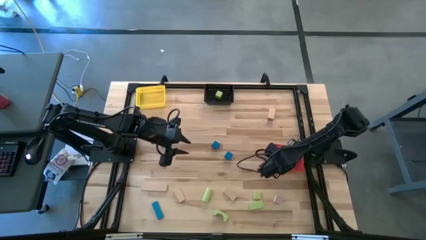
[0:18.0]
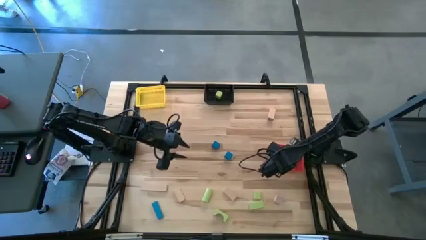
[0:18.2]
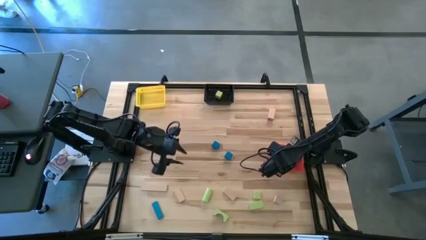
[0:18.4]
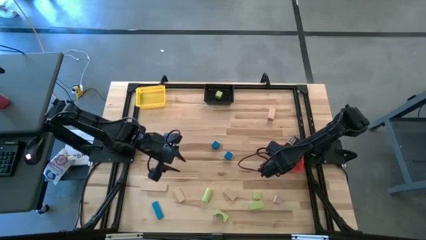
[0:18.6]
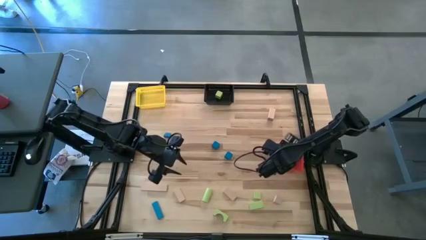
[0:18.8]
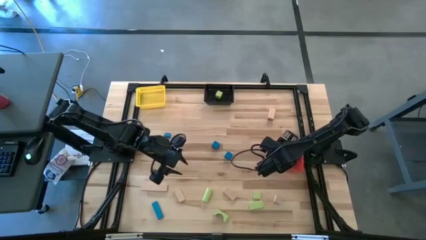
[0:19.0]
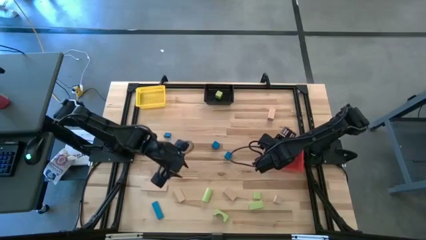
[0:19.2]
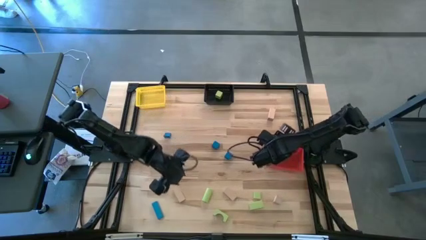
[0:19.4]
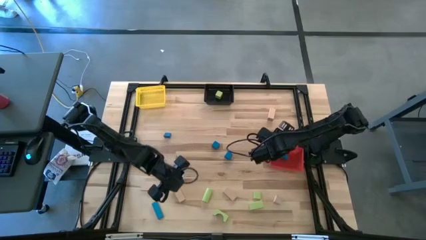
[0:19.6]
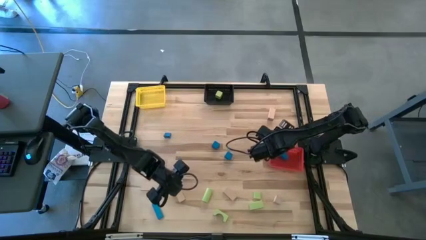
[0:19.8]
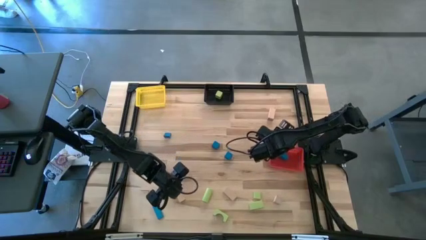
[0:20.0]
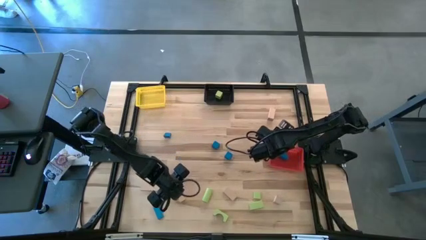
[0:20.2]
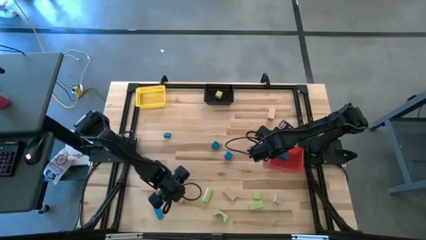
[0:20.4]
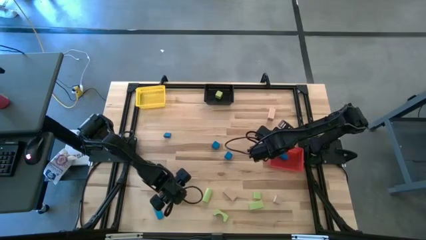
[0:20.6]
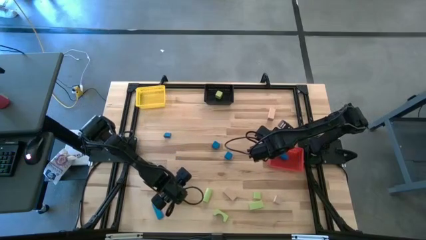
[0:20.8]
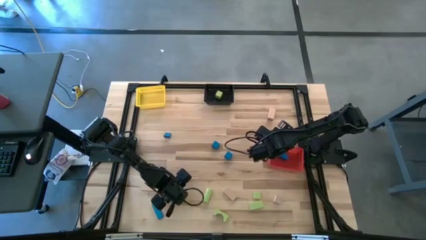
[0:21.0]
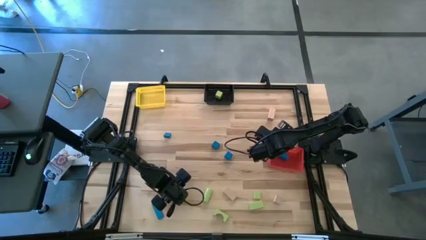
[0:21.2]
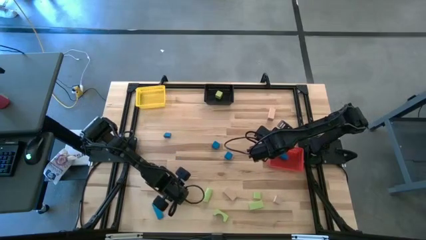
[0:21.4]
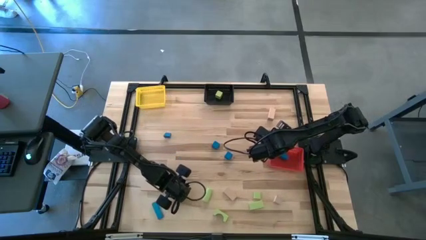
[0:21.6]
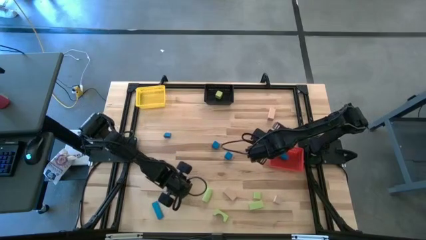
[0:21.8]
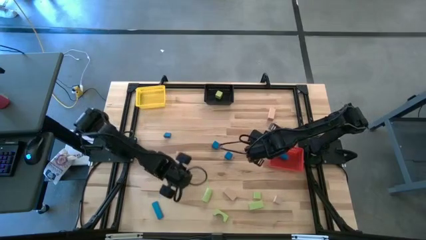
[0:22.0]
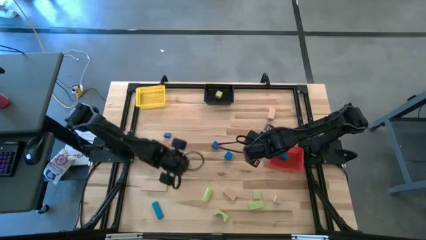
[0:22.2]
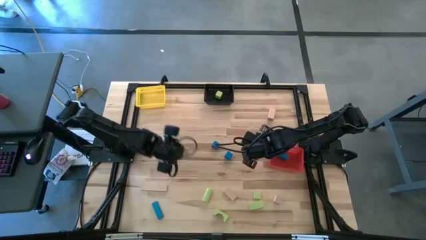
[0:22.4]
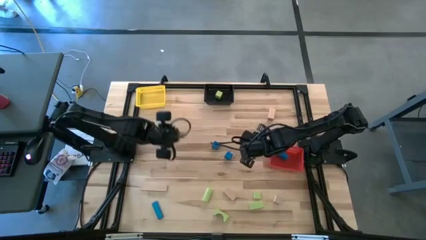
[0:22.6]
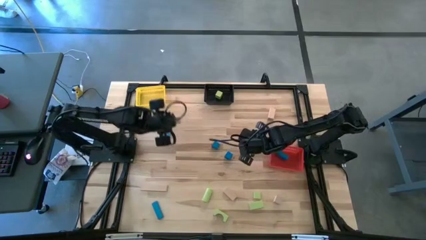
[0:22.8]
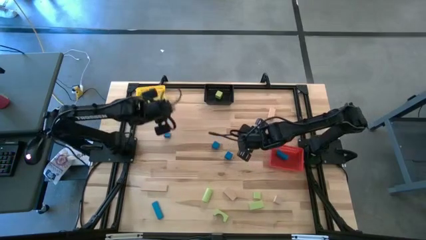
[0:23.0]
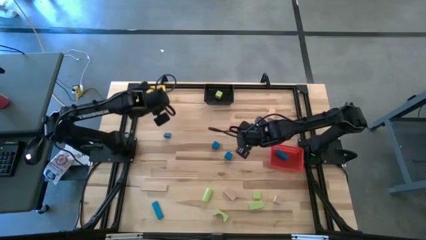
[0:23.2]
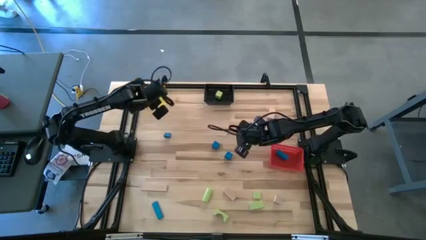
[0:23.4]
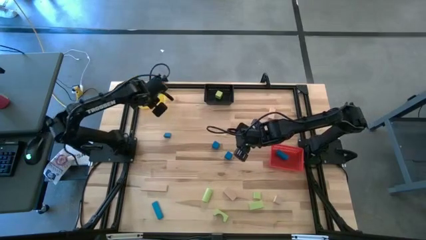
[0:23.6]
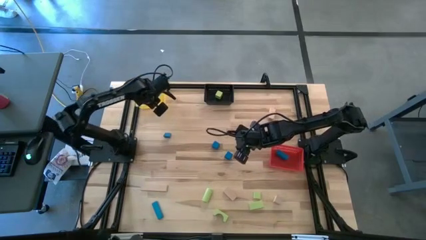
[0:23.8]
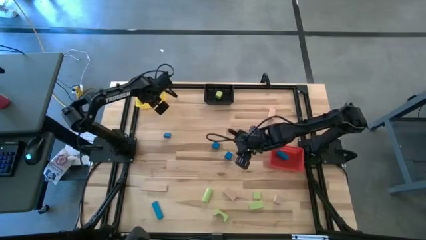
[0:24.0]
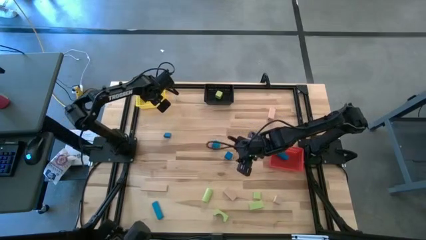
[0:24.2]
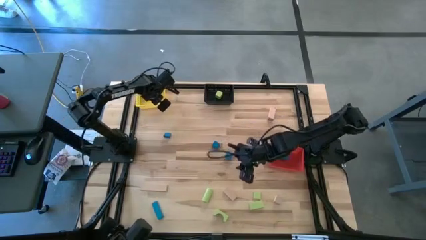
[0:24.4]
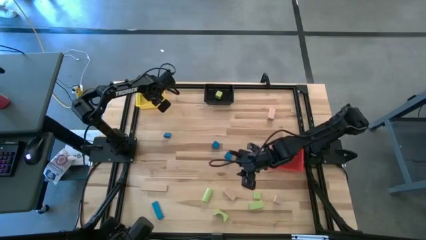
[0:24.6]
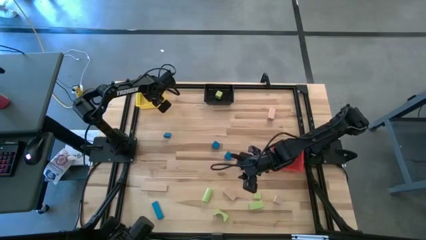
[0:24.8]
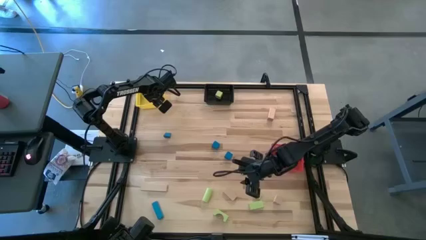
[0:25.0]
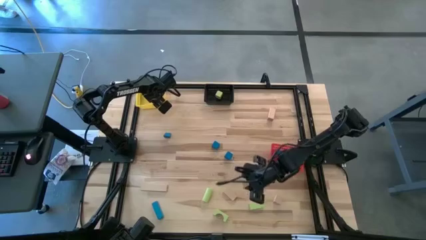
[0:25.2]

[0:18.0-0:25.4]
Task: Sort & place blocks by color
Put the brown block into the yellow basket

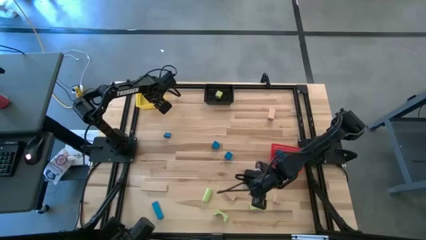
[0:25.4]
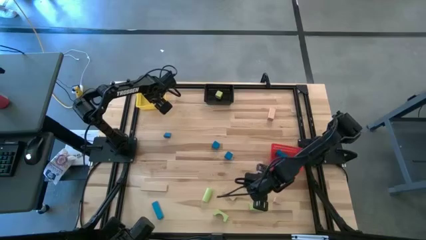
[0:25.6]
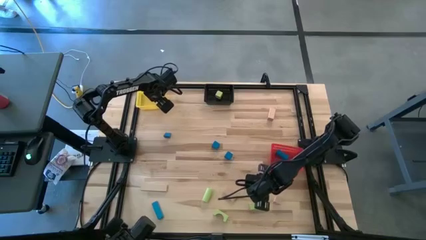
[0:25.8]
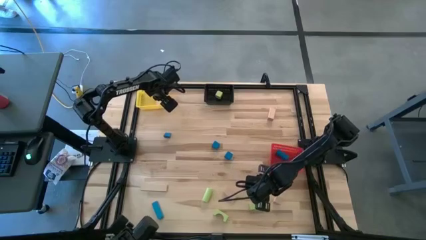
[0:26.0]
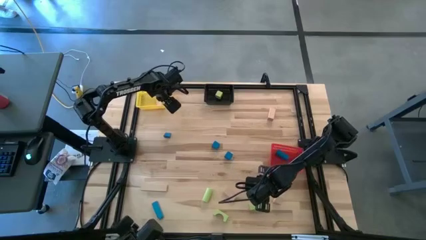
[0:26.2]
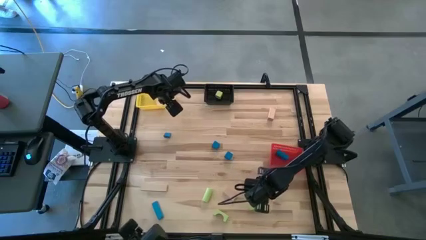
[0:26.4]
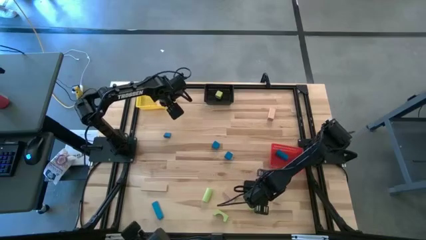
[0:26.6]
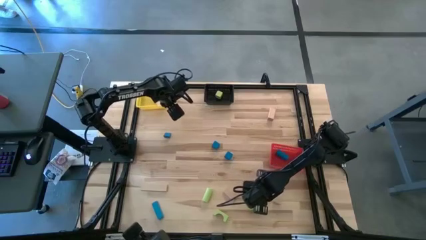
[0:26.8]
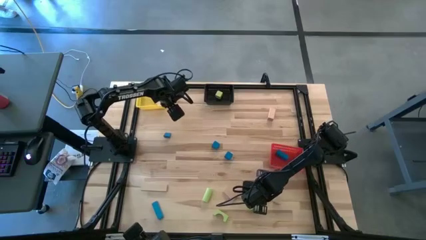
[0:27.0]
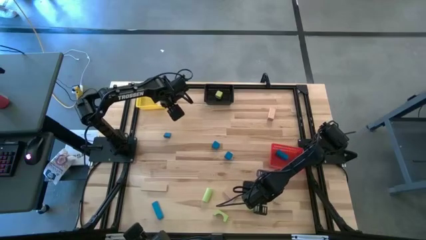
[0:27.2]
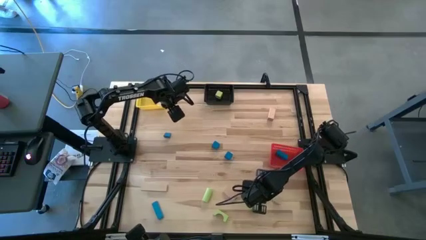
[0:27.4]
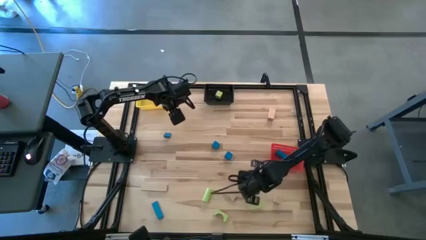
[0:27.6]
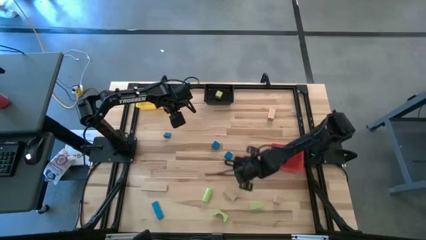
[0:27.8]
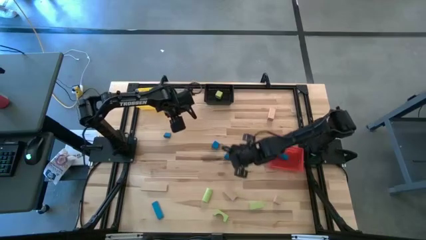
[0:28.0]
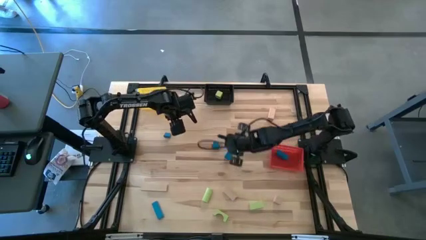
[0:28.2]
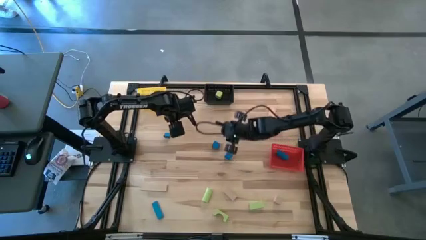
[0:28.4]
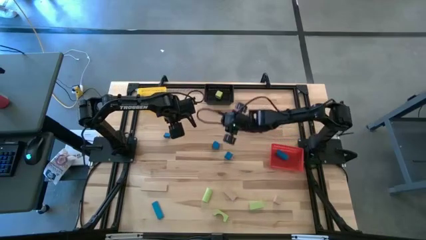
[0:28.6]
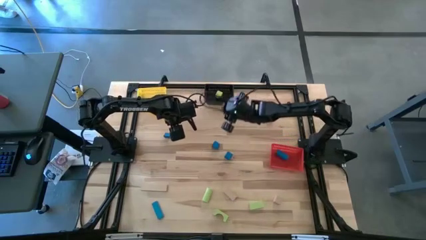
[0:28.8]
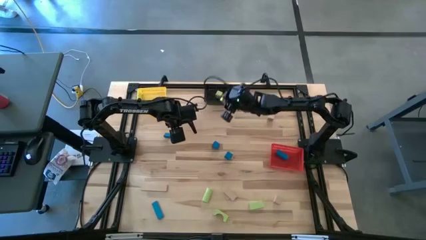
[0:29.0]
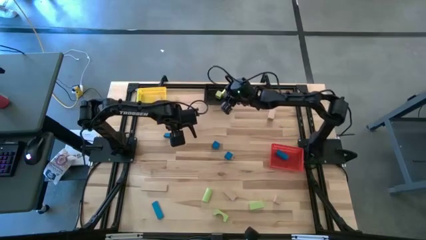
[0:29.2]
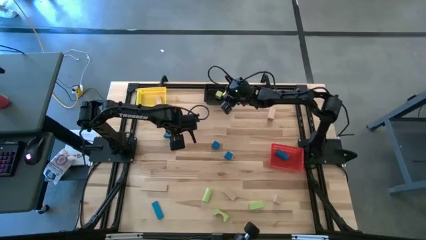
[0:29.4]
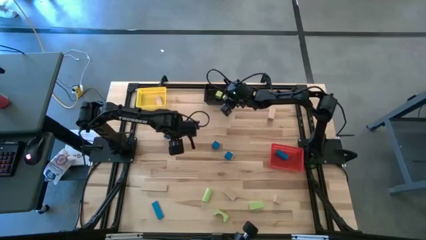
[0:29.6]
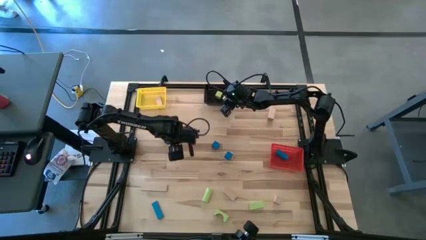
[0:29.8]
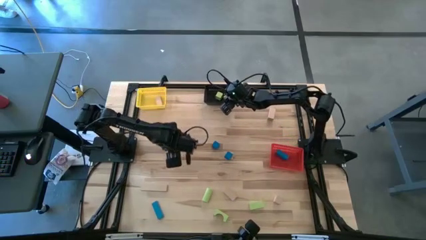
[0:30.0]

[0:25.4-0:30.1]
Put the green block into the black basket

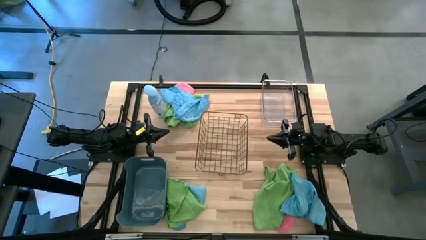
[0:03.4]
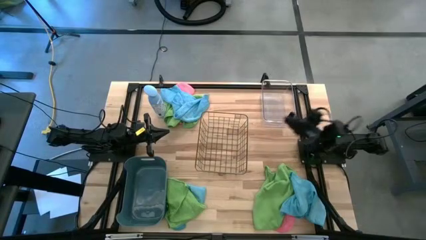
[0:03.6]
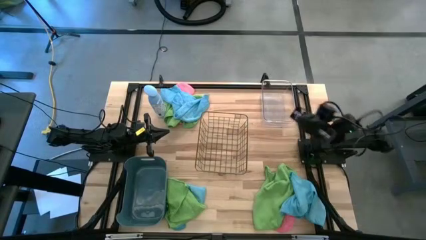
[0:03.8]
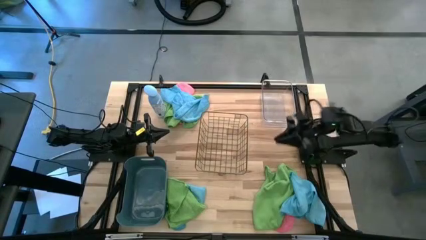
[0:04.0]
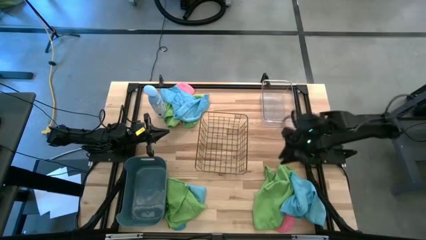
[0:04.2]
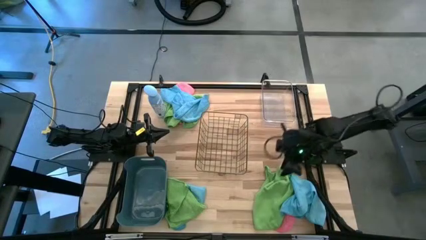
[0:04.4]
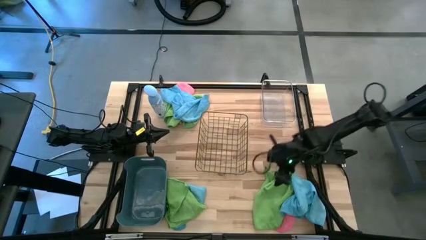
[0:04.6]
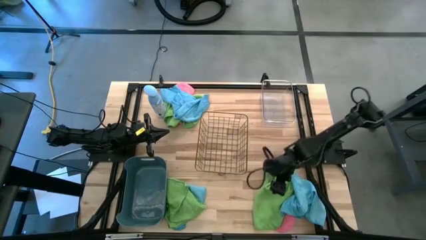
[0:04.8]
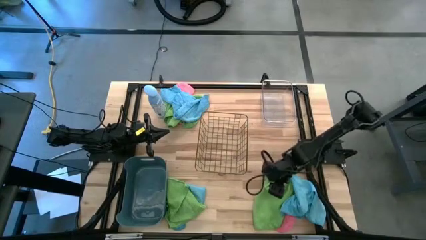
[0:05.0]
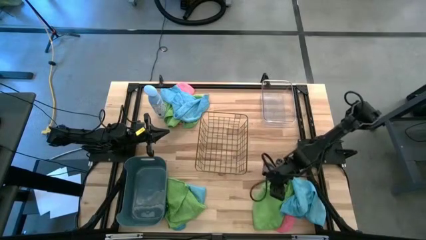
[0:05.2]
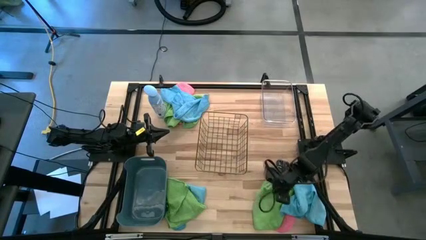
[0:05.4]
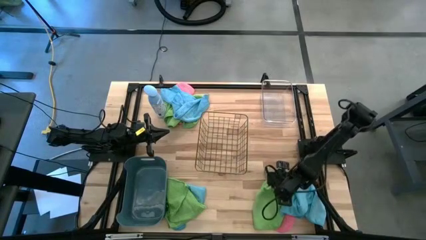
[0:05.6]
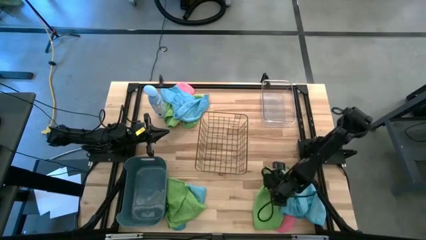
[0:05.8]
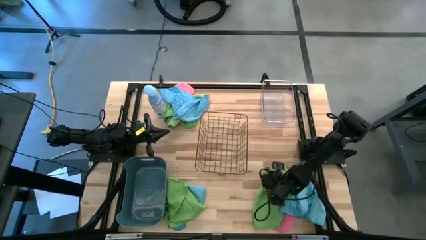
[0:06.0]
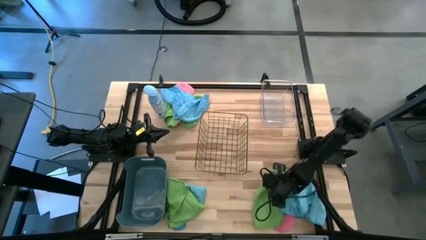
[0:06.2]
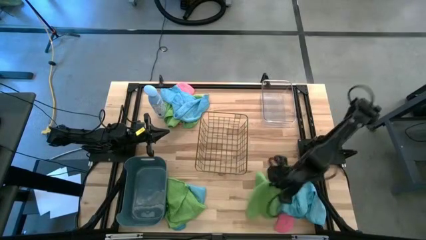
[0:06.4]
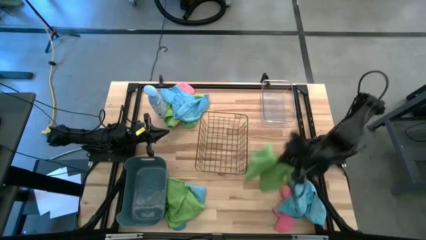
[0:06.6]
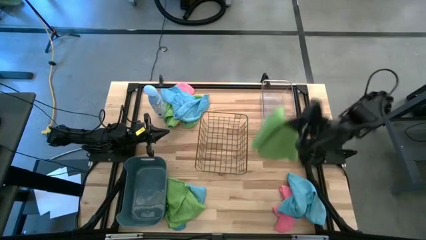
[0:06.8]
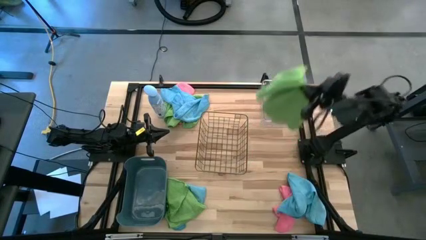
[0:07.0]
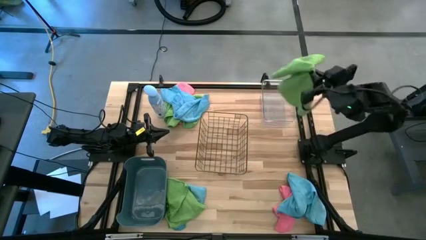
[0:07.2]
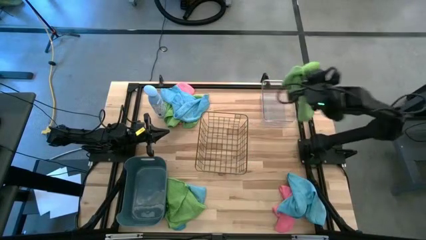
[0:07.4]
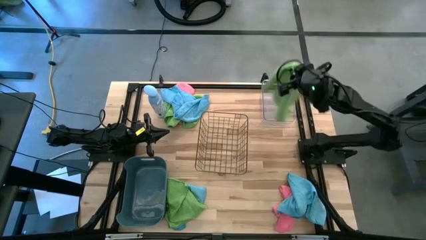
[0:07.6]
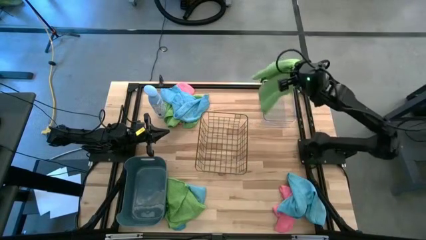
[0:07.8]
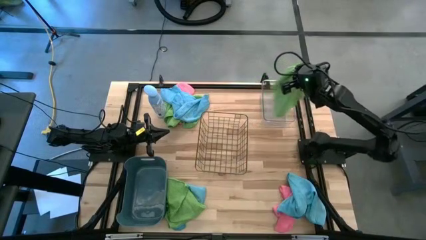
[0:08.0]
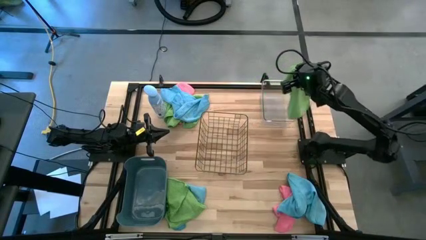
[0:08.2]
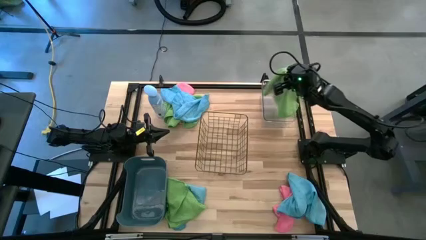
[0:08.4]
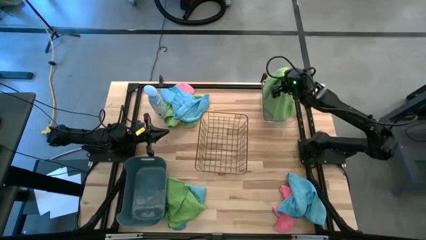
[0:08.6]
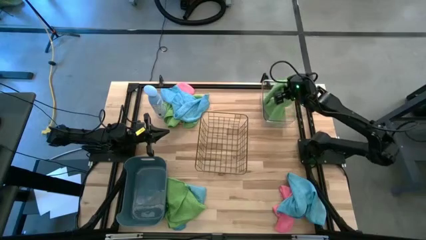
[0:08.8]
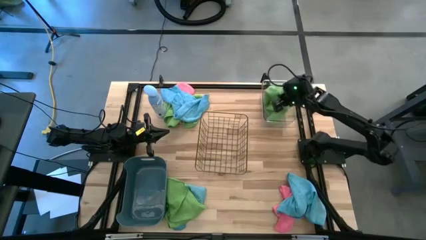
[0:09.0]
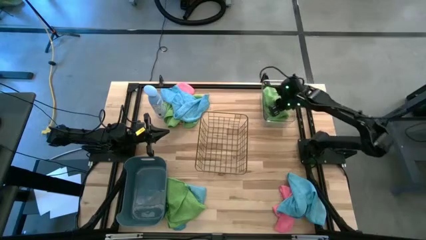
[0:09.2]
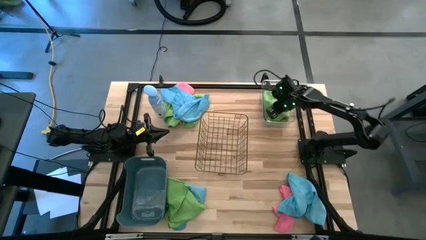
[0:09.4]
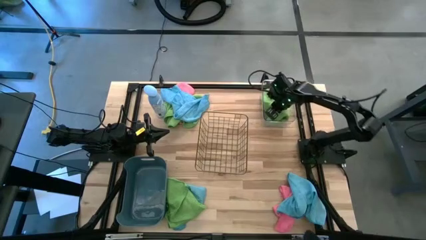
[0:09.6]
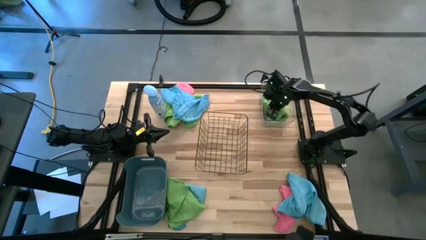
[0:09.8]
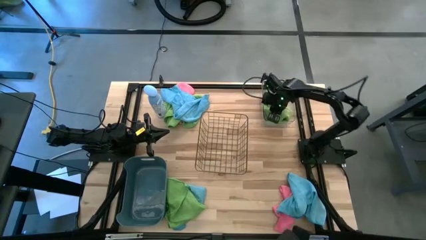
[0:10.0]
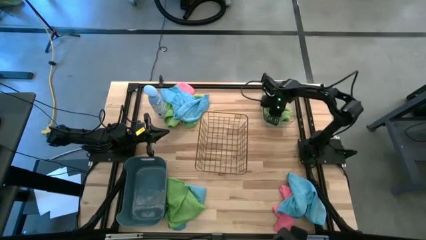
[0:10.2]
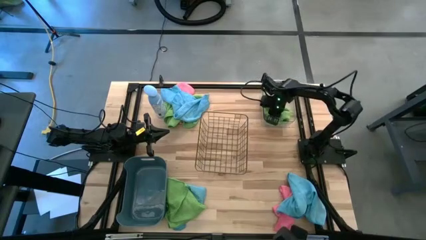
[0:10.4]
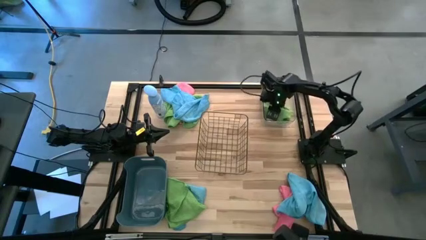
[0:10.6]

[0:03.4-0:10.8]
Task: Sort microfiber towel by color & place in baskets
Put the bottom right green microfiber cloth into the transparent bin
